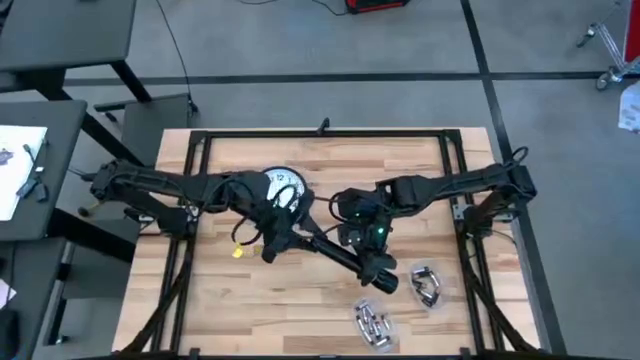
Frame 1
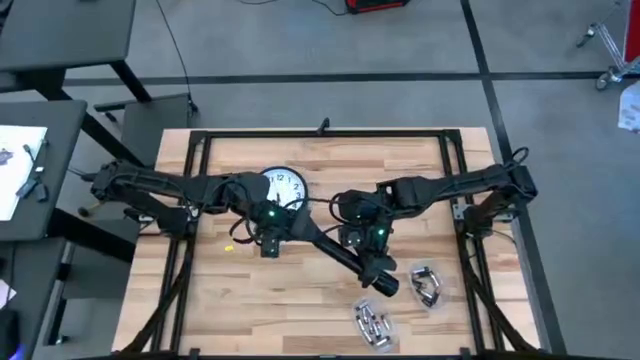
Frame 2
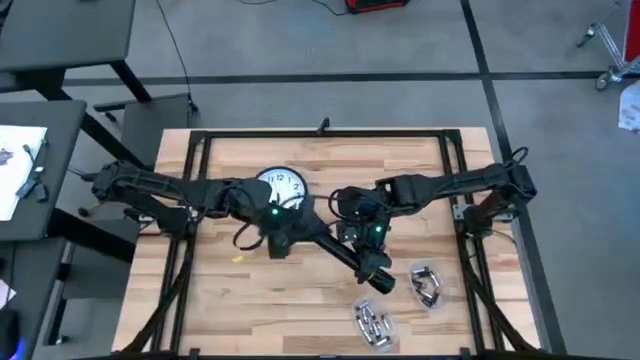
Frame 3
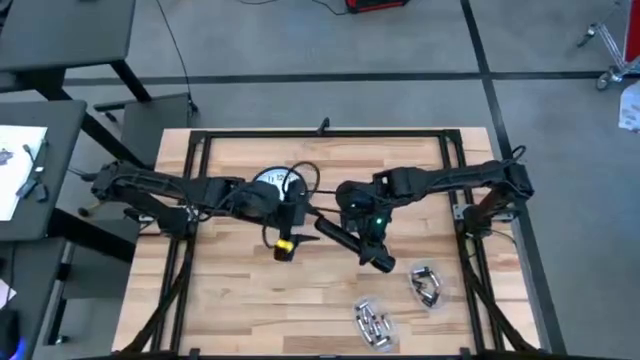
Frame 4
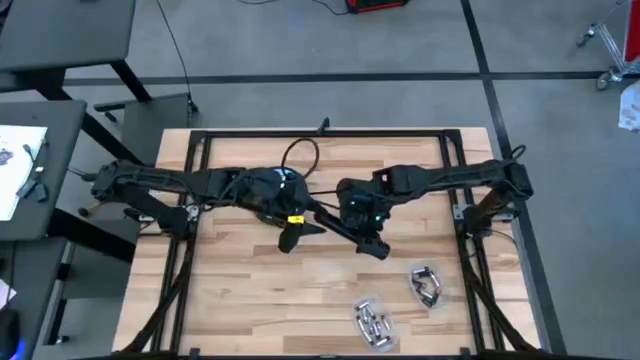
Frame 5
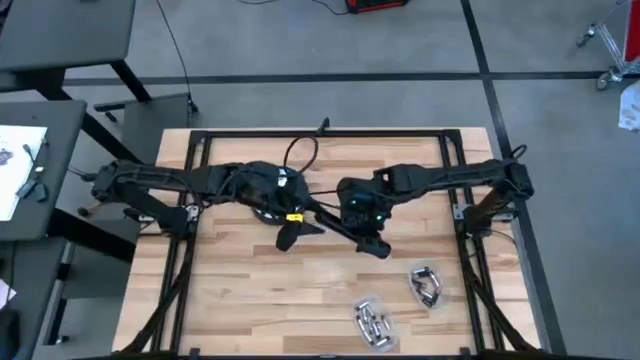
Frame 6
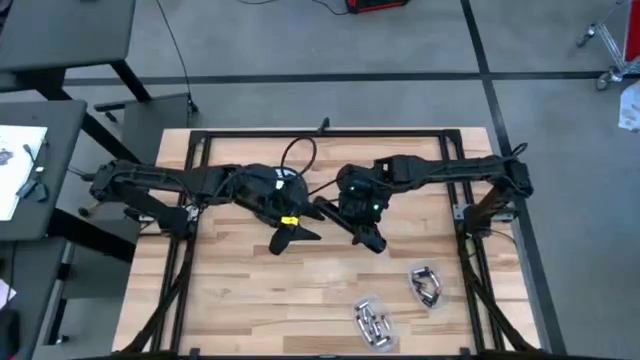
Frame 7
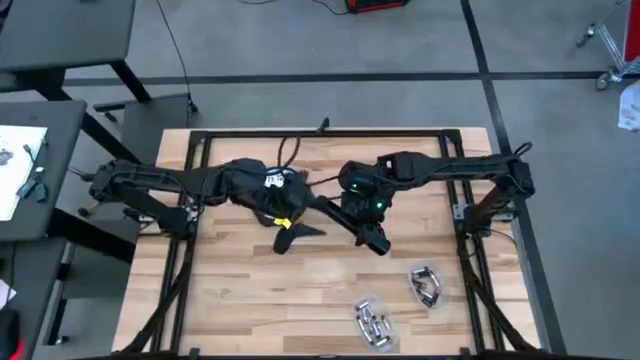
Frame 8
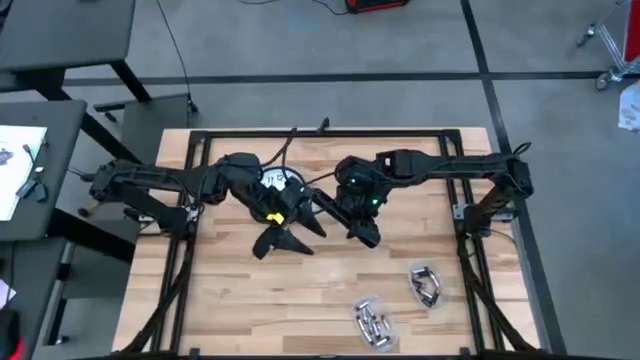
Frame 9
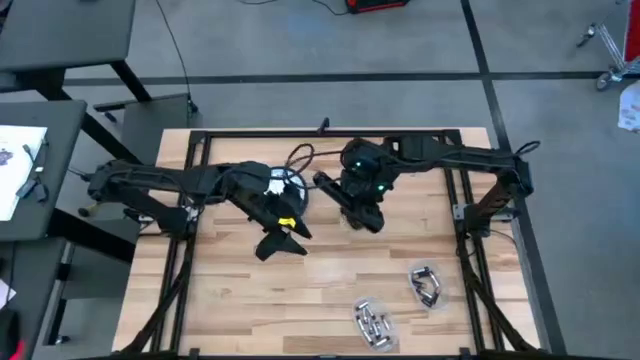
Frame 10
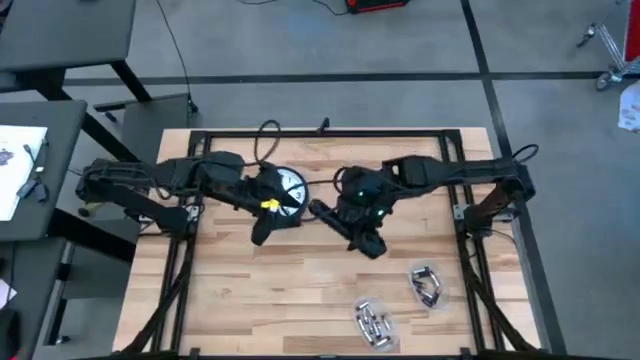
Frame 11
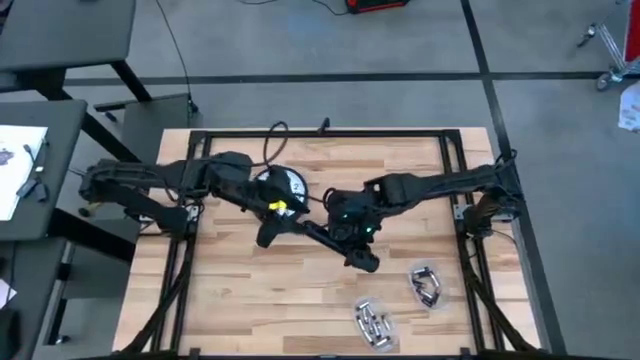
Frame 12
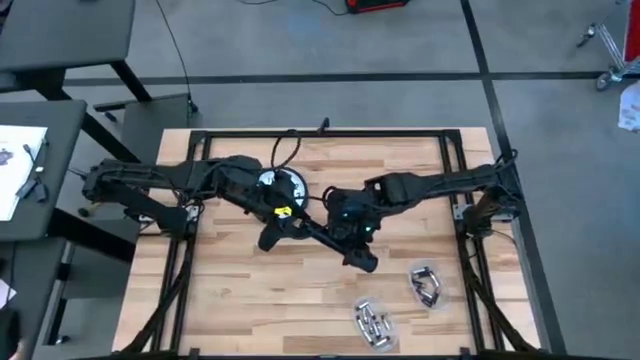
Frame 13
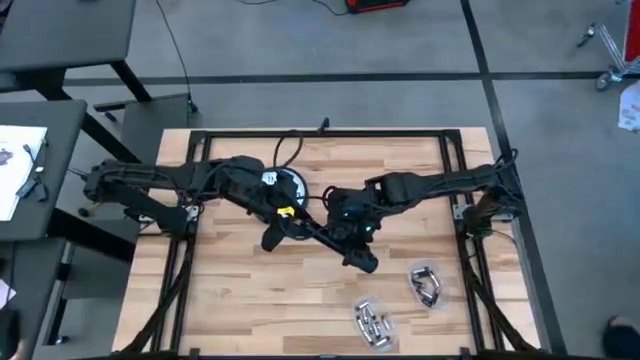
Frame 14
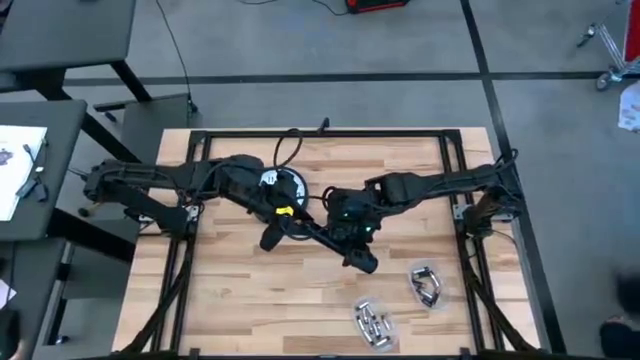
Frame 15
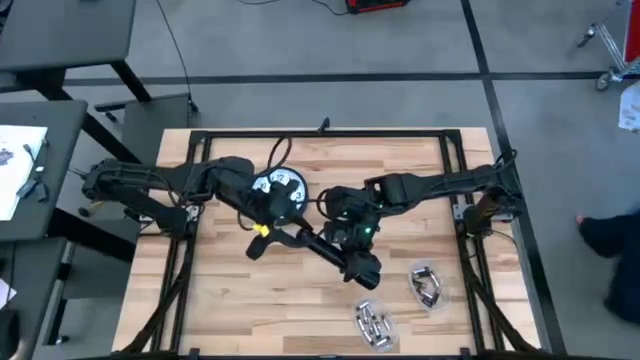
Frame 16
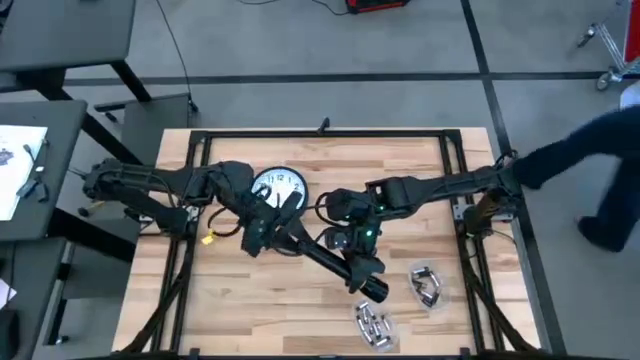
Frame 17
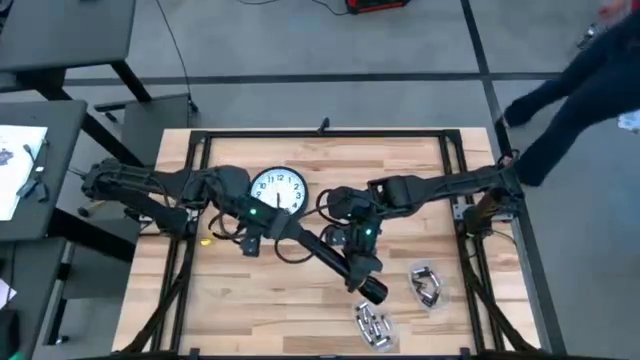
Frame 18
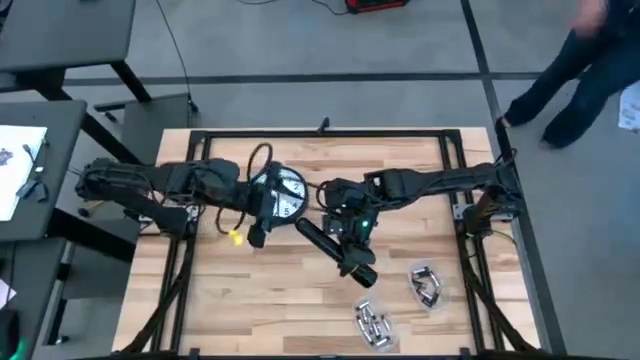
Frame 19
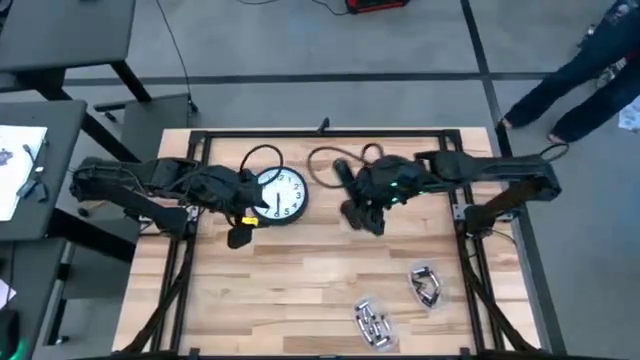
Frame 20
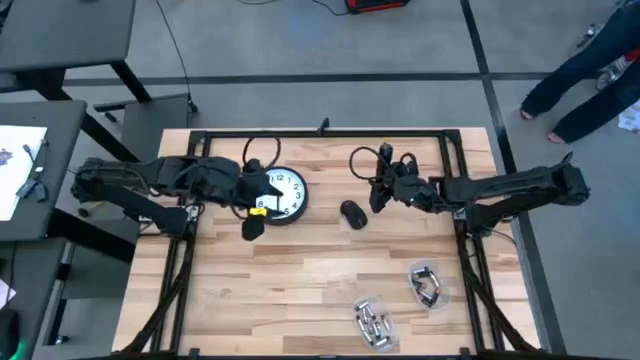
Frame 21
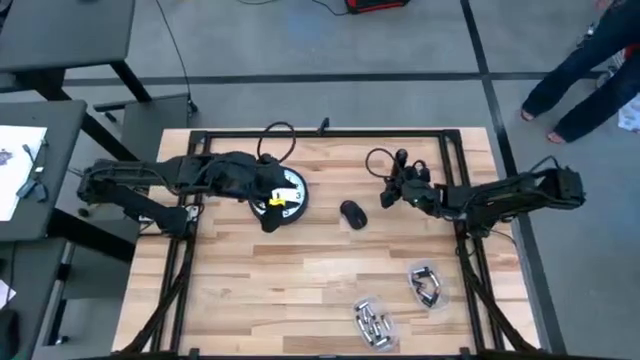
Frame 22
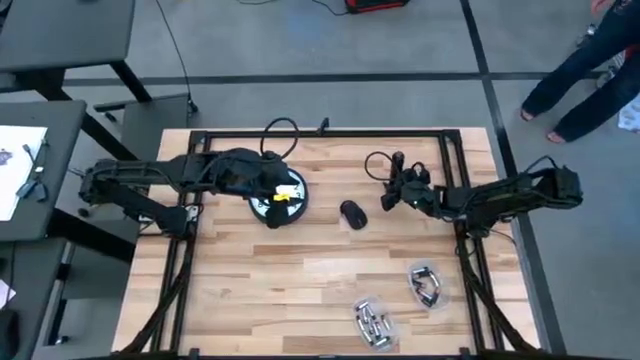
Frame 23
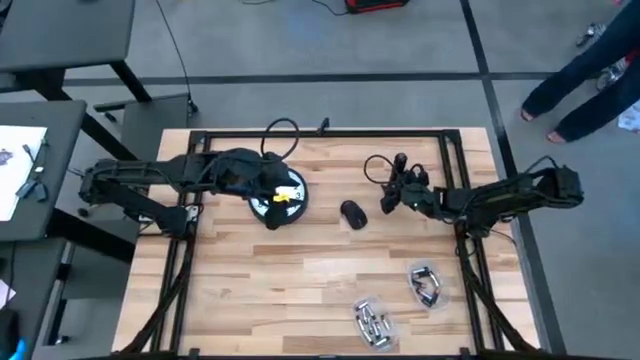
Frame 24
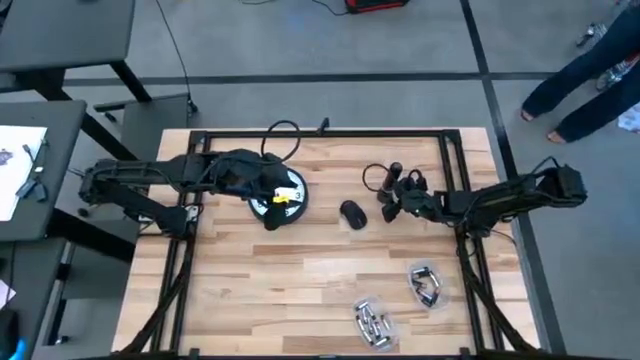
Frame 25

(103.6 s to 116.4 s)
Task: Insert battery
Close the black flashlight battery compartment

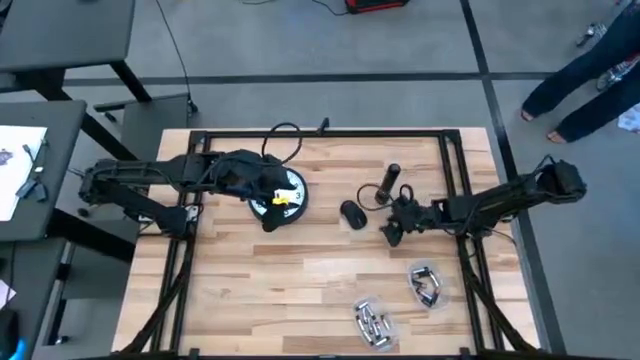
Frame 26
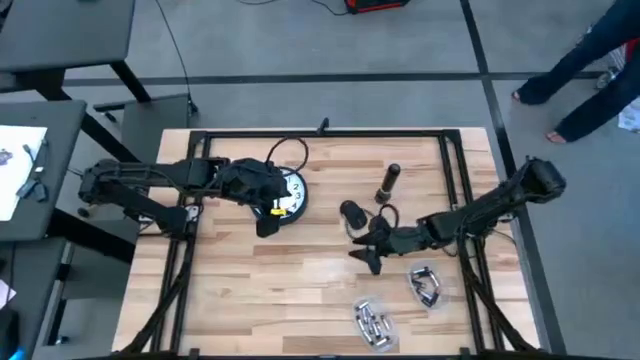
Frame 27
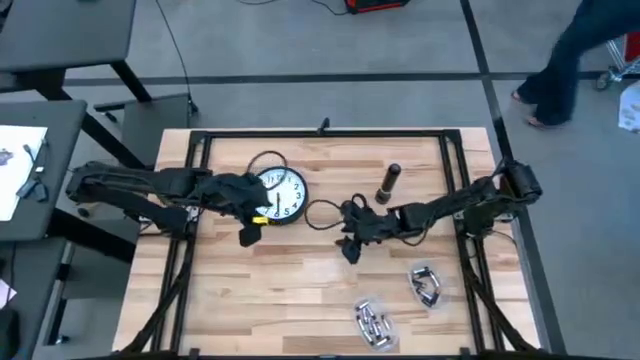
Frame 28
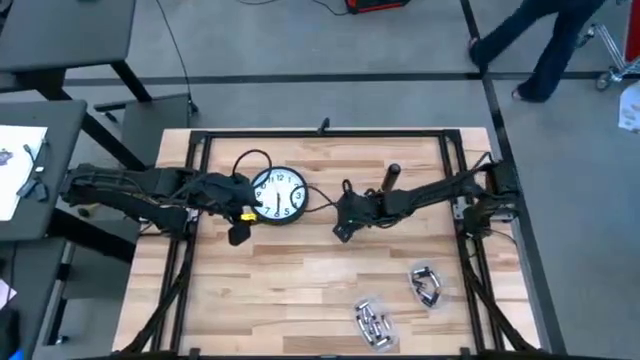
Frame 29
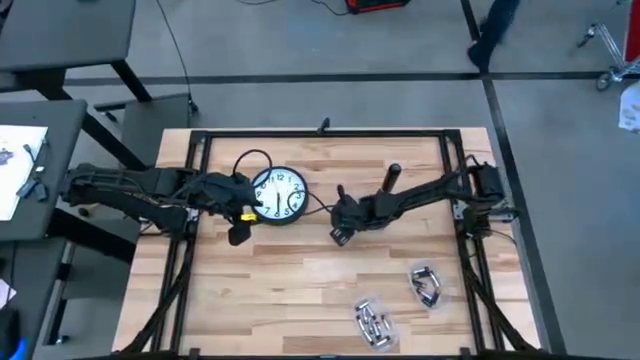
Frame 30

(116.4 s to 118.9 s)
Prepare the black computer mouse

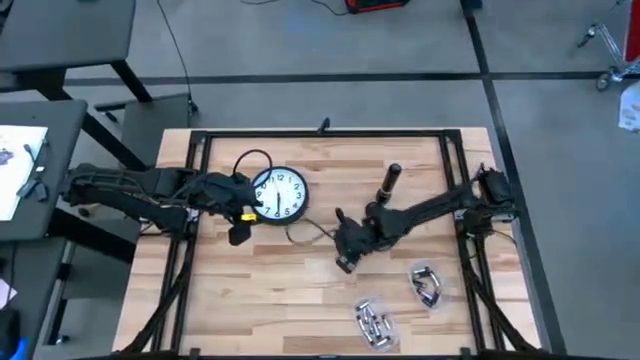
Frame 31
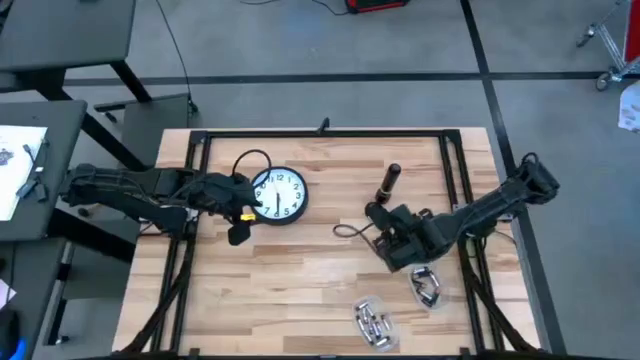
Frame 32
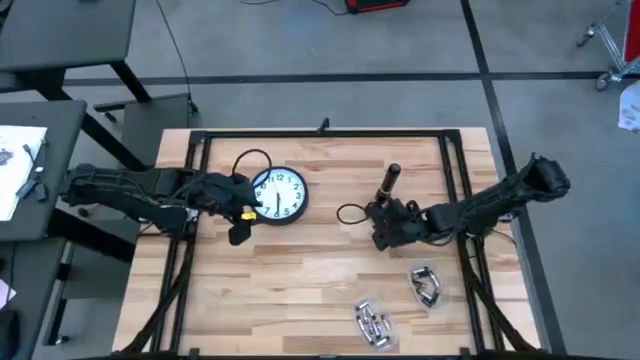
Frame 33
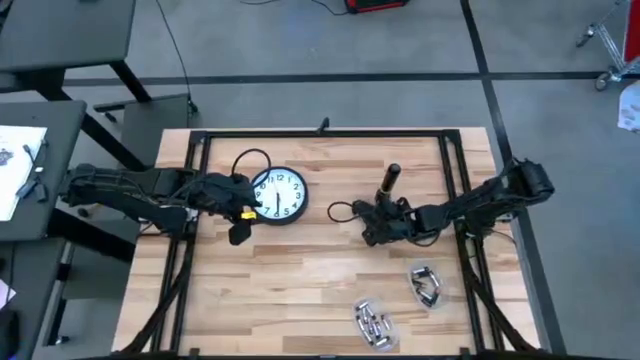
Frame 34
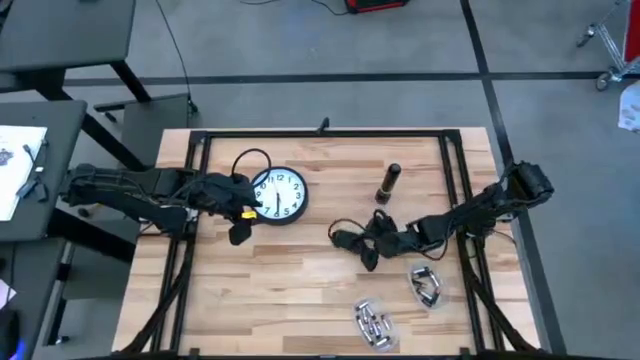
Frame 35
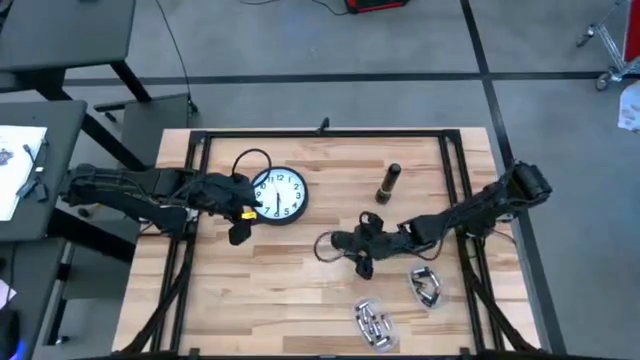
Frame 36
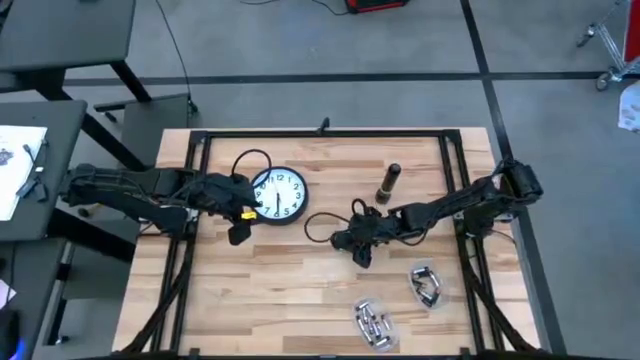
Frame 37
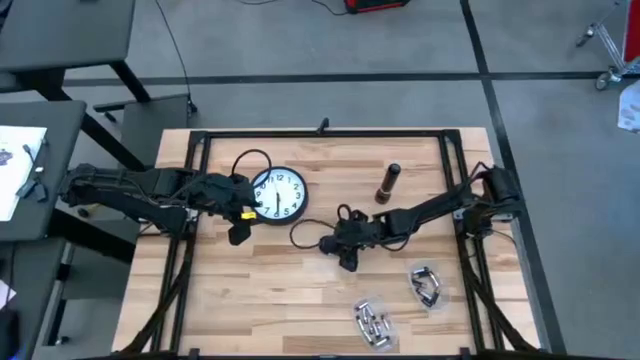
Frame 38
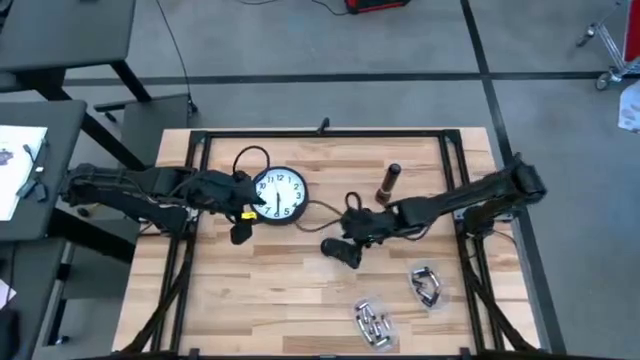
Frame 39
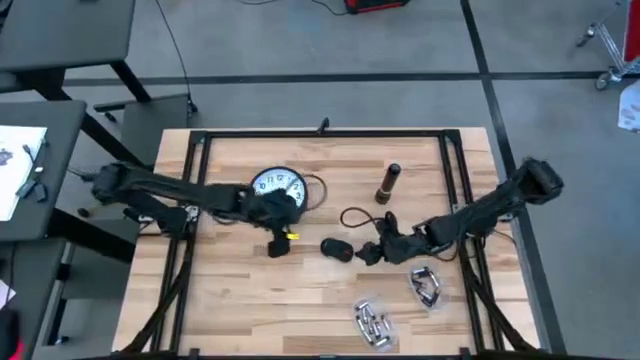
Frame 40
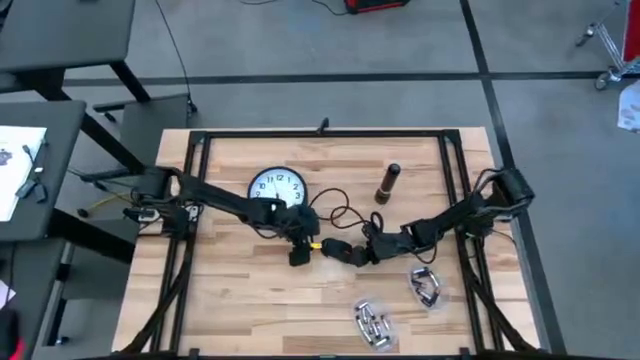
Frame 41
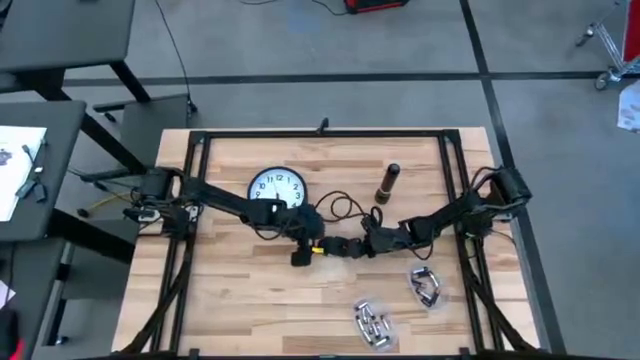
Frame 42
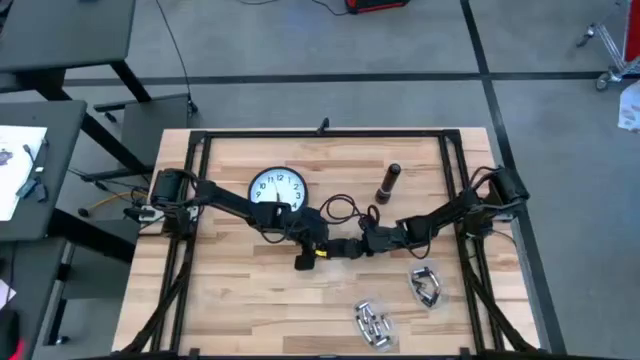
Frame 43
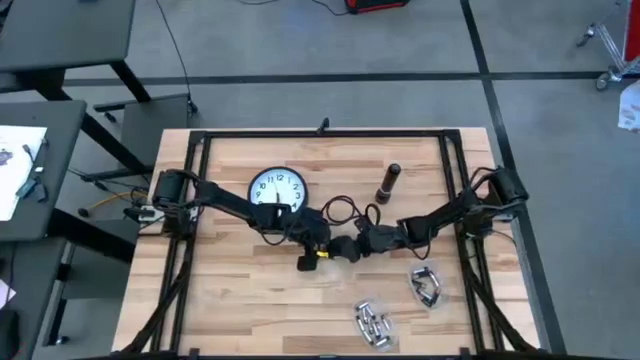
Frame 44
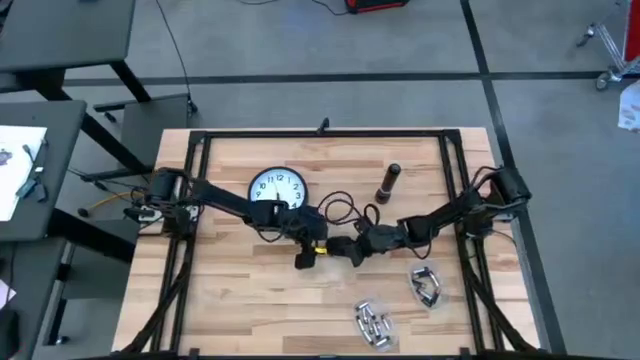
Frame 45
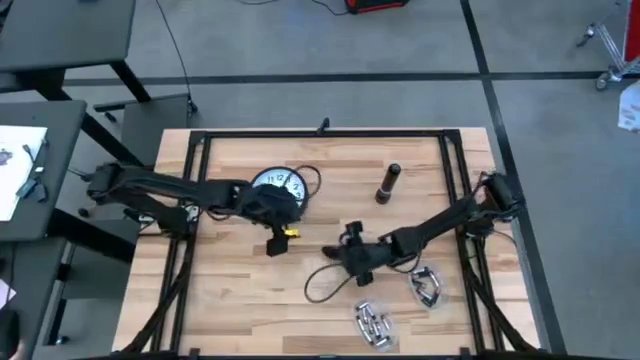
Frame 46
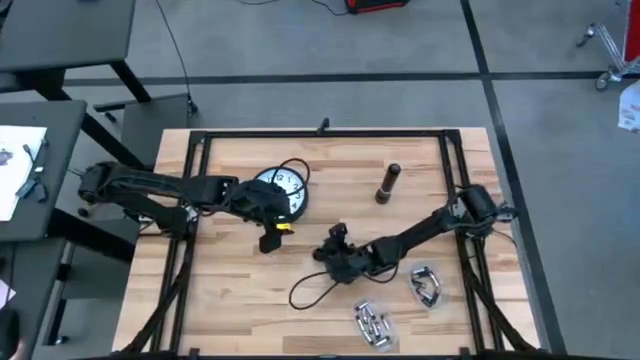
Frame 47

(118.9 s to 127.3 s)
Prepare the black computer mouse
